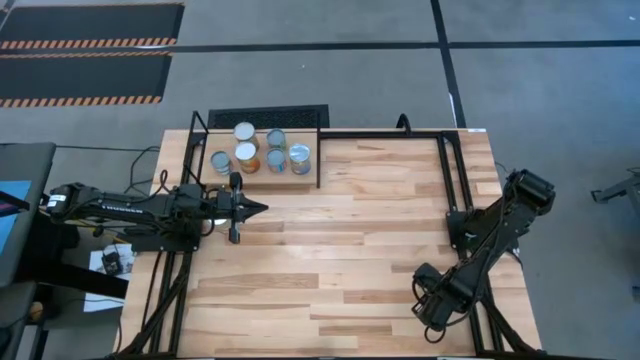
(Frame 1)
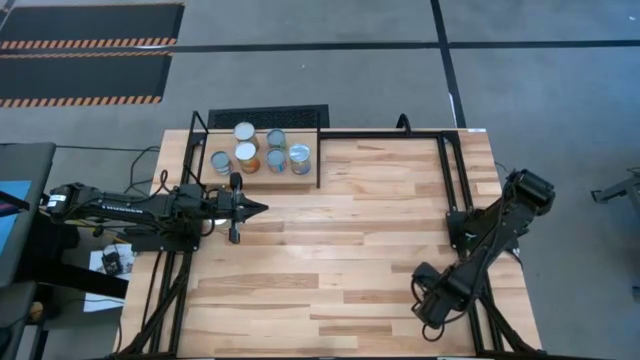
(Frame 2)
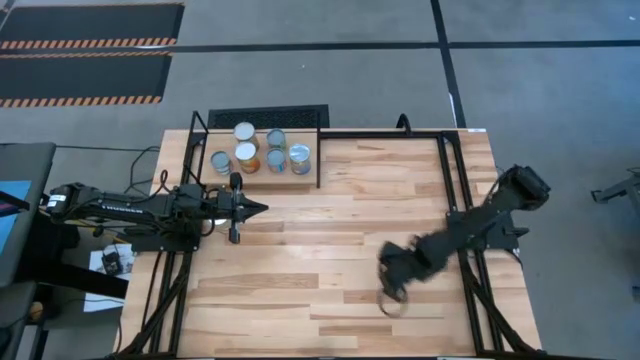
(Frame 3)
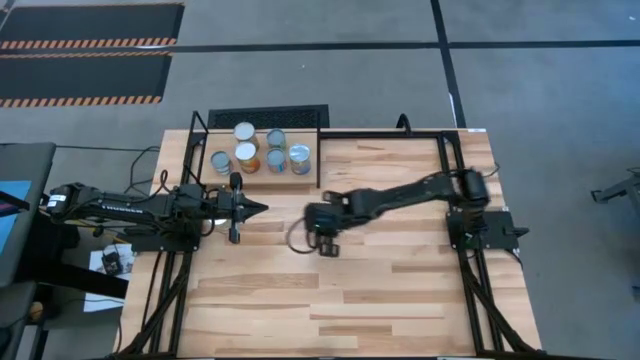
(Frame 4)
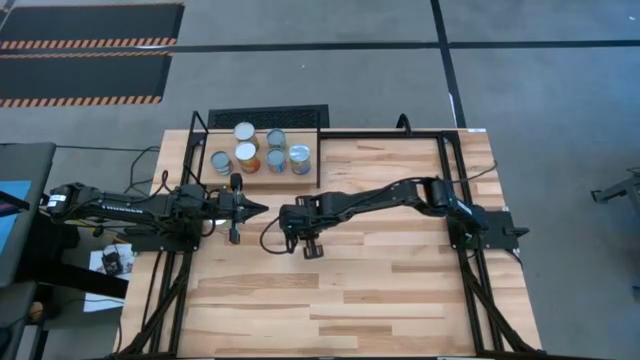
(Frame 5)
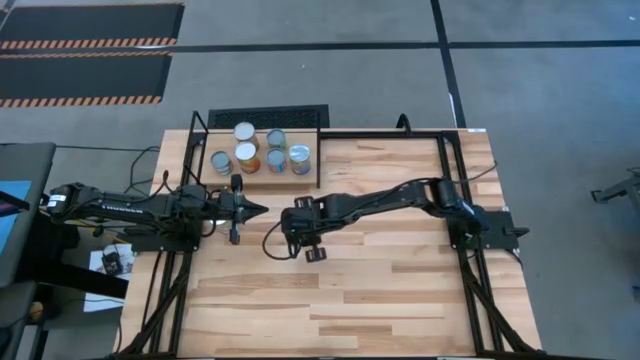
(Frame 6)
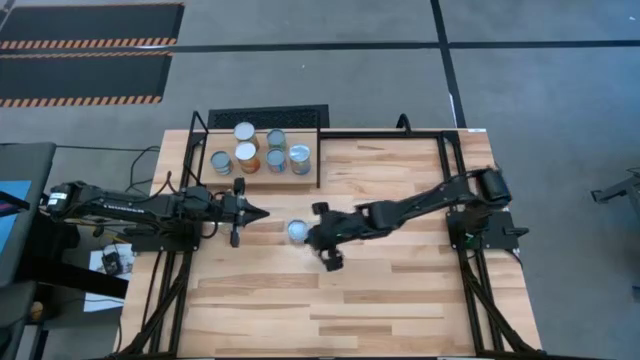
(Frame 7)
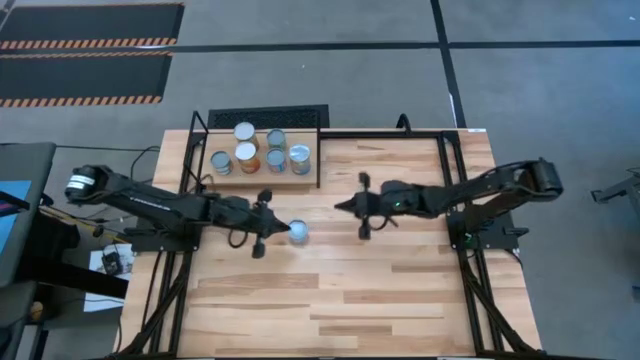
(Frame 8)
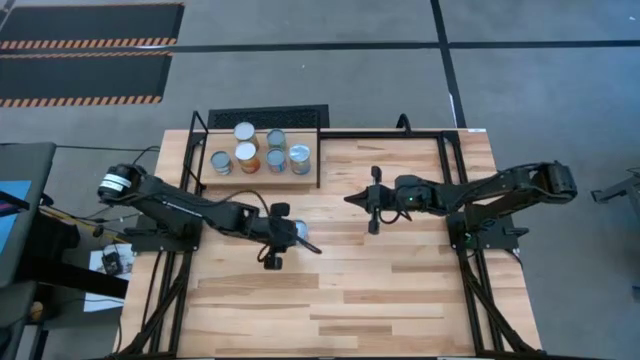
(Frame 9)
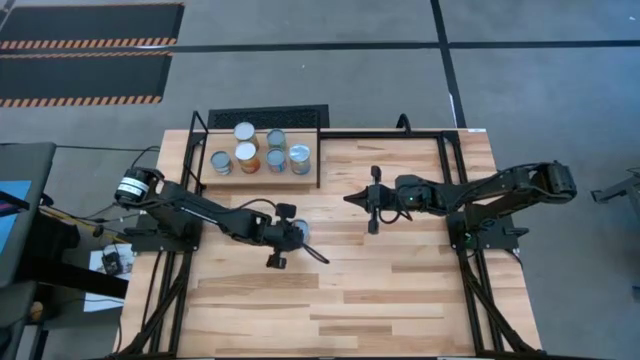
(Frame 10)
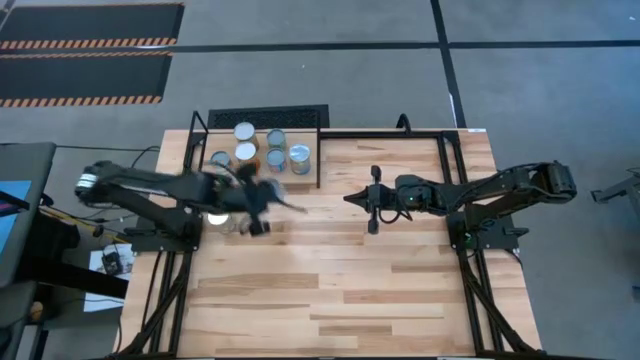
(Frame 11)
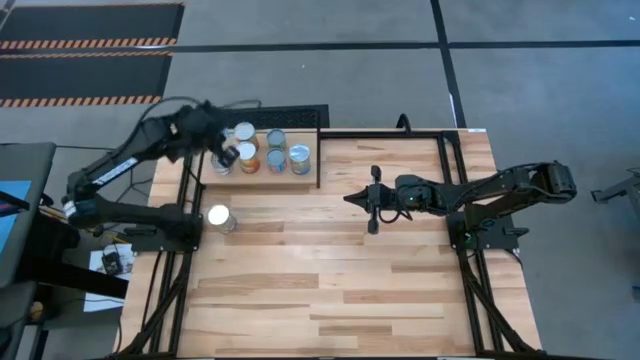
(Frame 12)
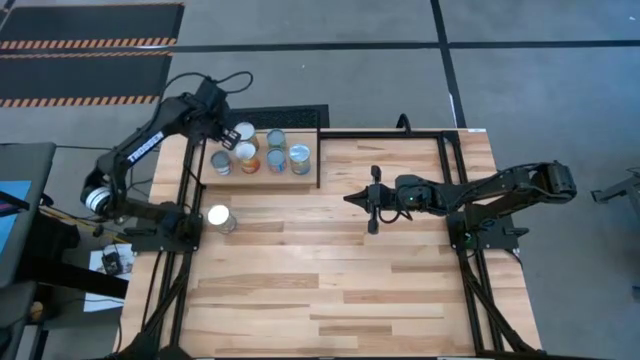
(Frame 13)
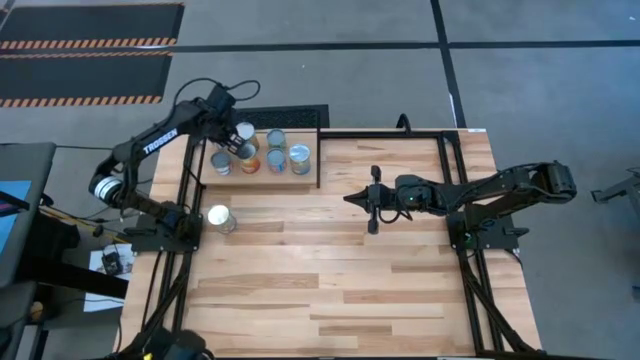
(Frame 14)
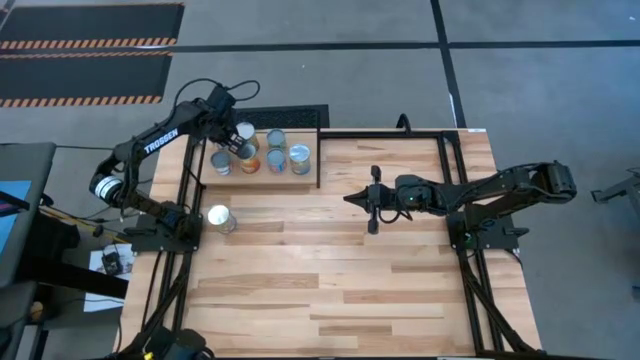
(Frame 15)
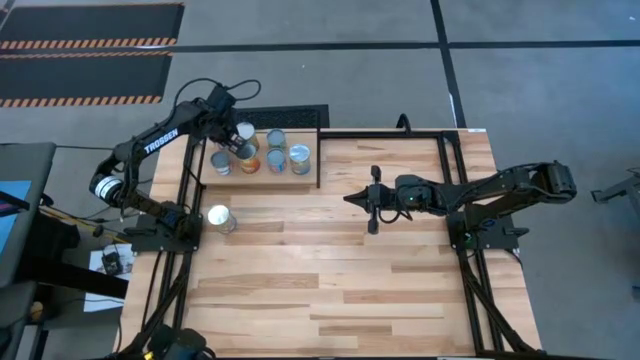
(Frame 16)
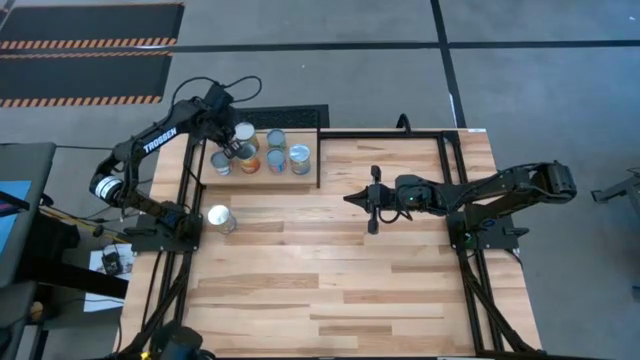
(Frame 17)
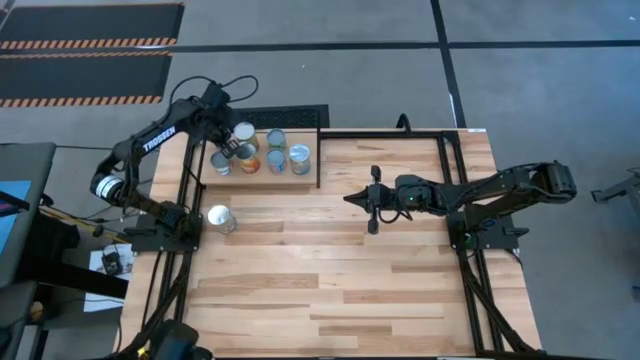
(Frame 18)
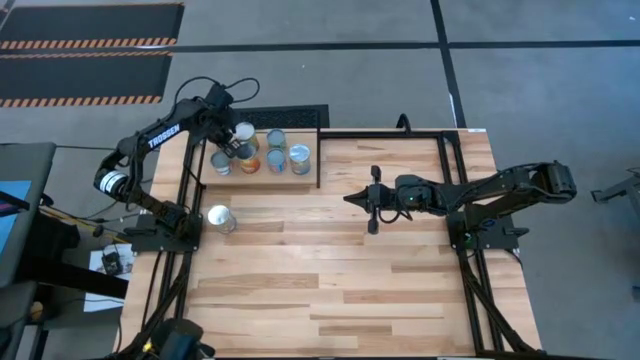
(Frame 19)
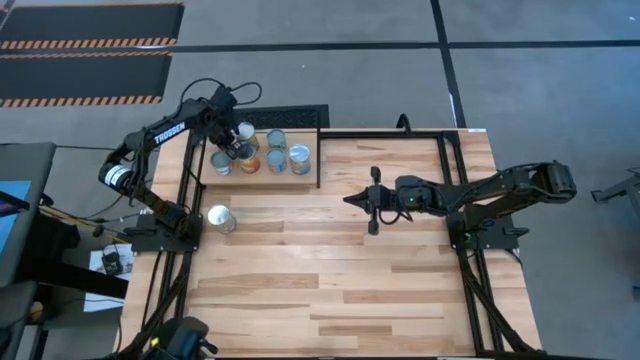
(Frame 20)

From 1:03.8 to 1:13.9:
Task: Pick and place cans onto a shelf
Put the canned carrots on the shelf

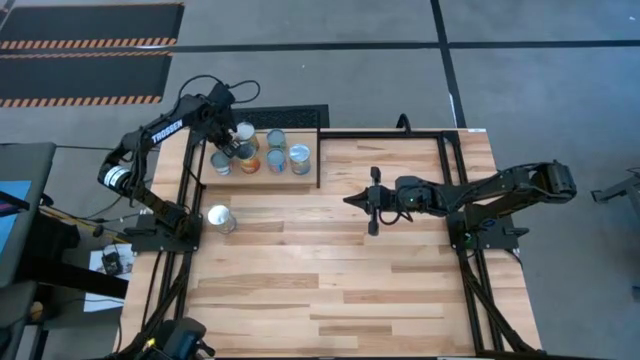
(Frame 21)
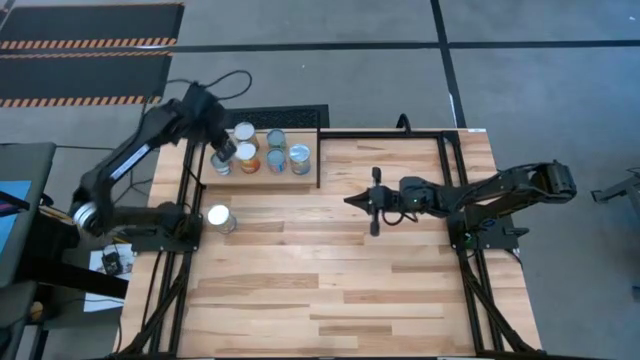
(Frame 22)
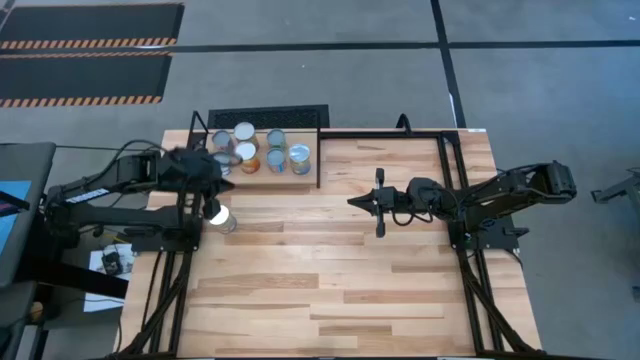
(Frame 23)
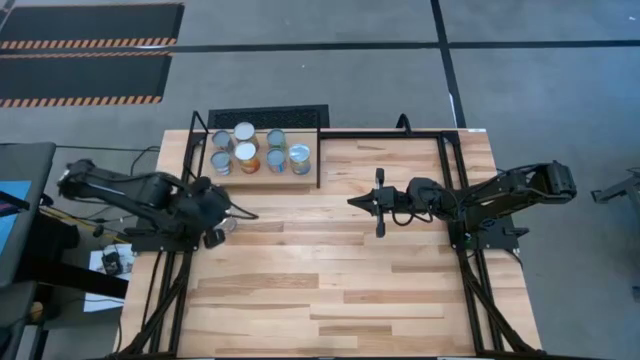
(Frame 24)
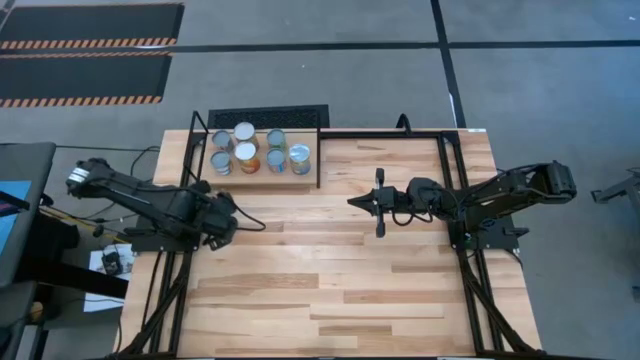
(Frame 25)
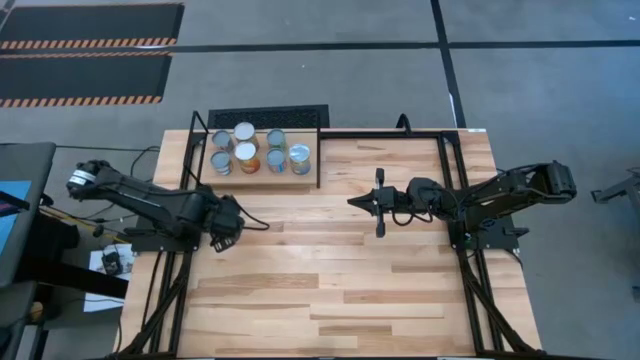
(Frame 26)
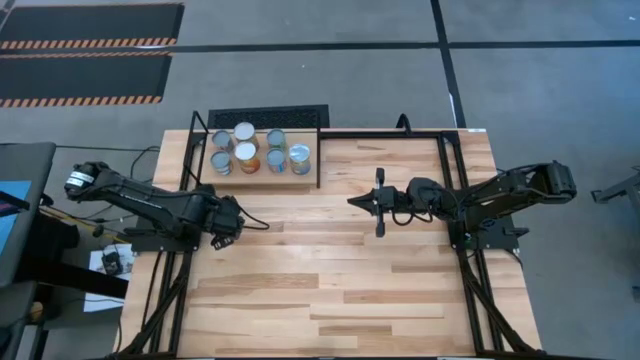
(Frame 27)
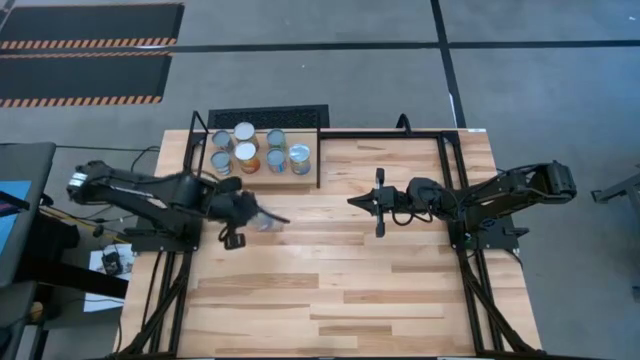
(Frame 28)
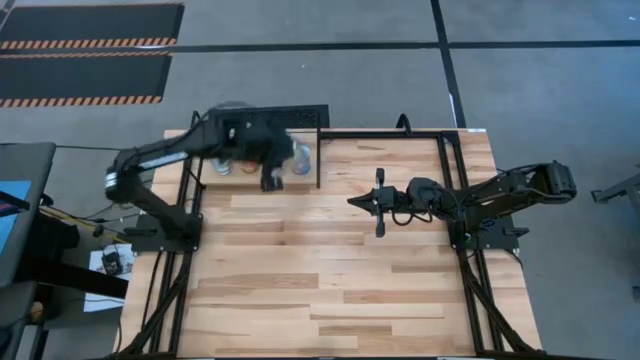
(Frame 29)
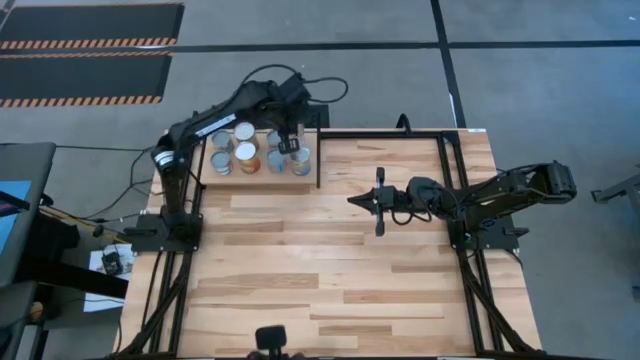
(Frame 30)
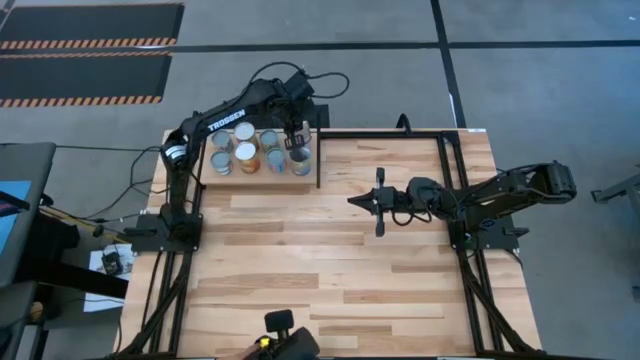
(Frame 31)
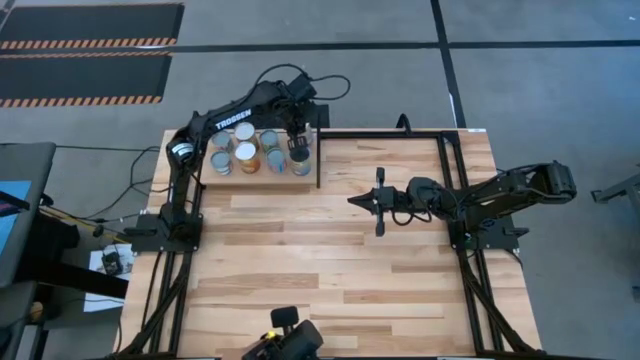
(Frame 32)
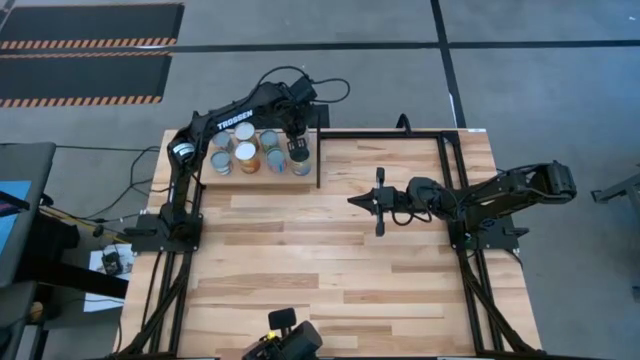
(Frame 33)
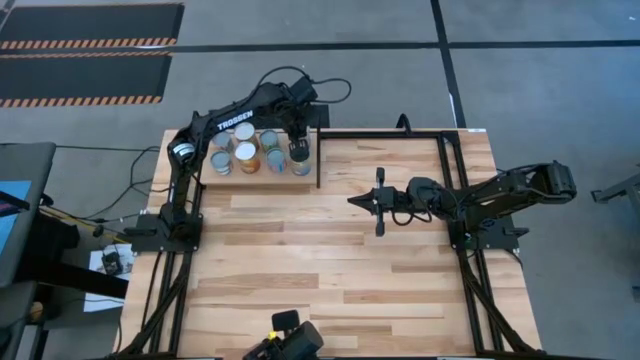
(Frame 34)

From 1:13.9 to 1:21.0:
Put the peaches on the shelf

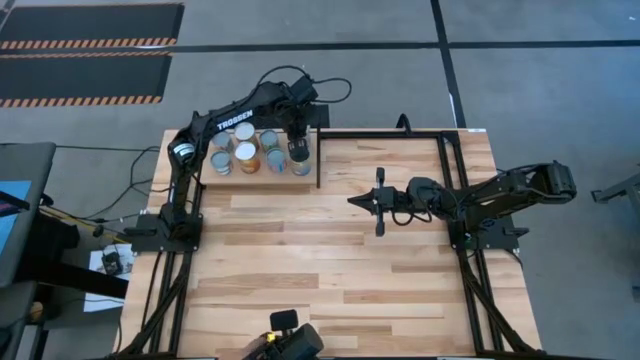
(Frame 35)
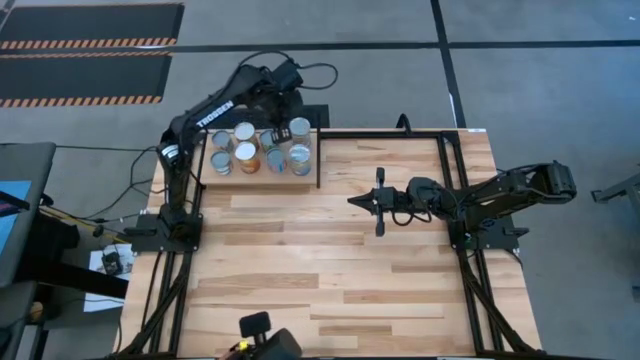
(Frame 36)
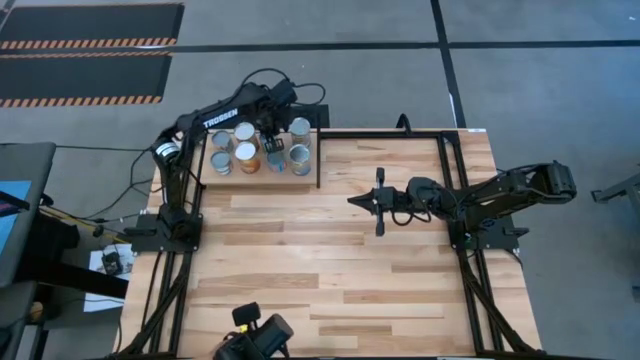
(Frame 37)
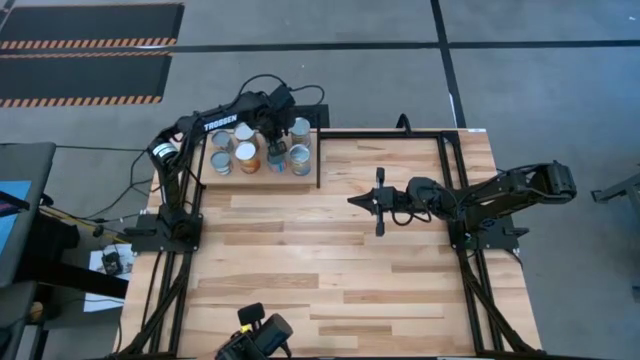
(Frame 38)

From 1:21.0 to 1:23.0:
Adjust the canned corn on the shelf

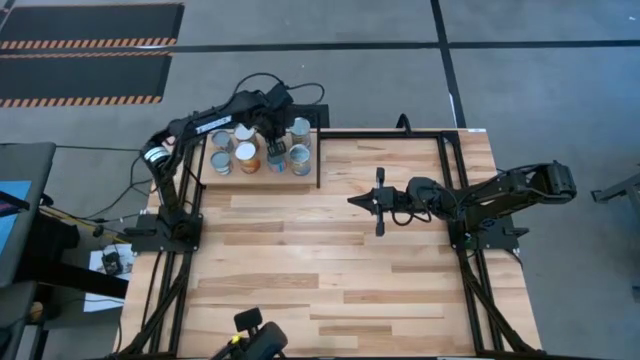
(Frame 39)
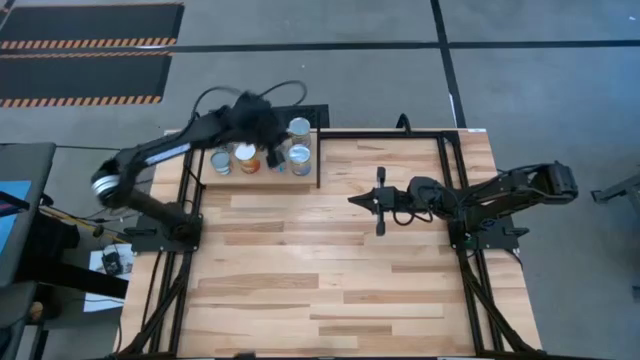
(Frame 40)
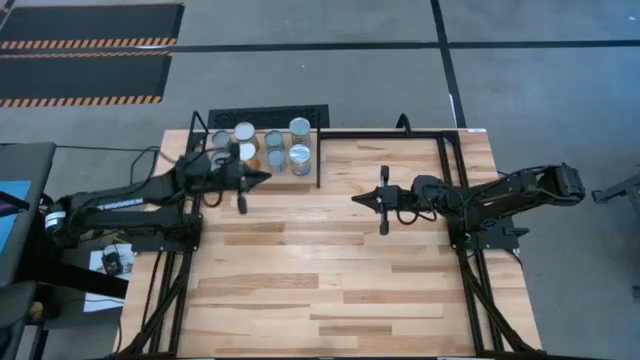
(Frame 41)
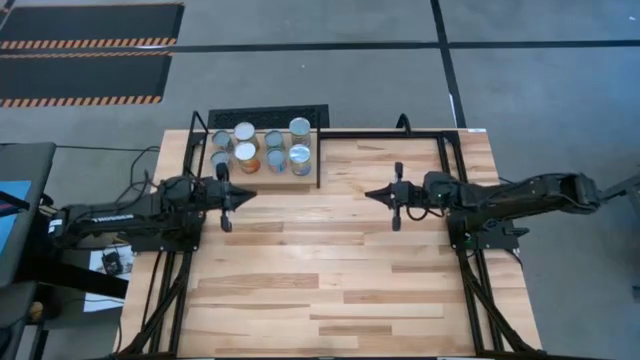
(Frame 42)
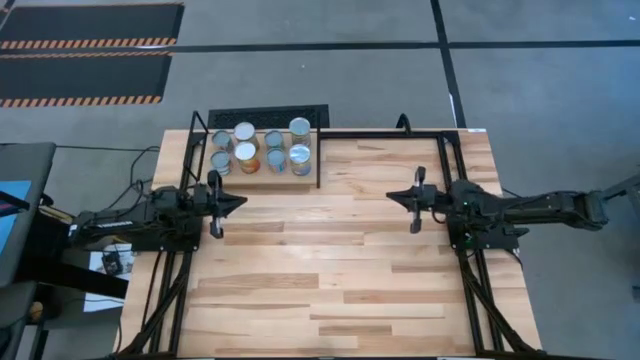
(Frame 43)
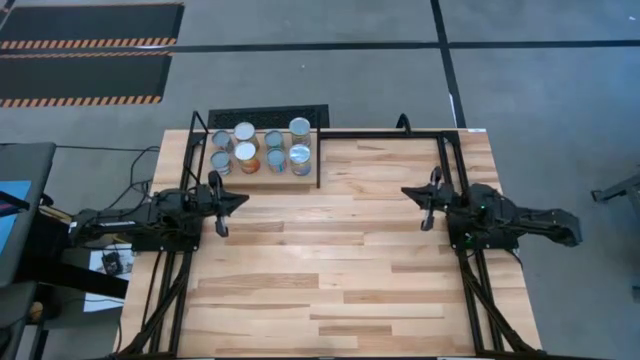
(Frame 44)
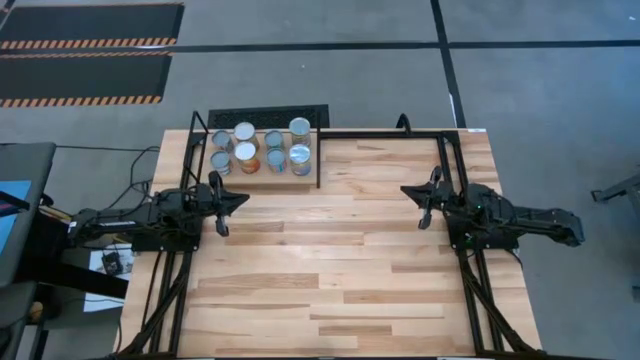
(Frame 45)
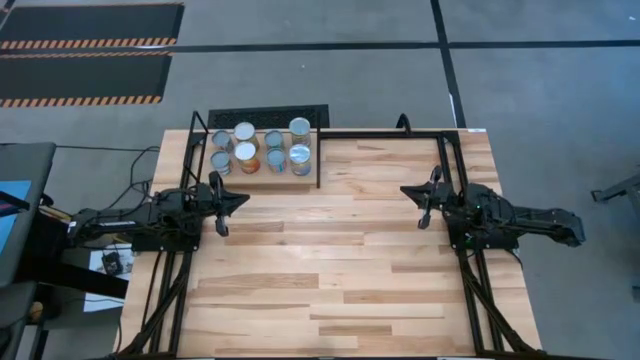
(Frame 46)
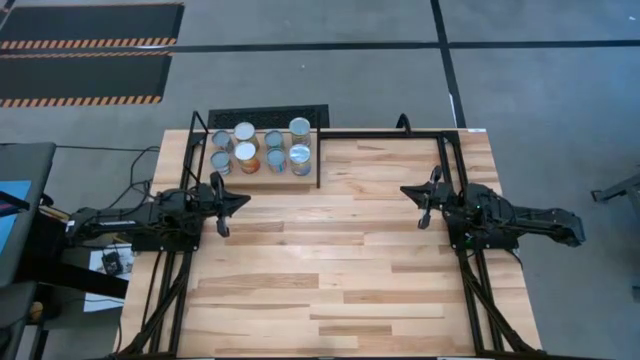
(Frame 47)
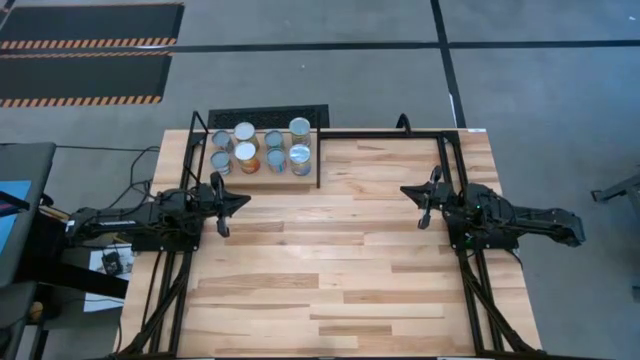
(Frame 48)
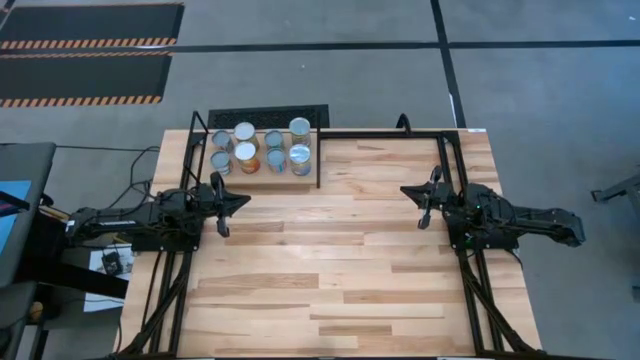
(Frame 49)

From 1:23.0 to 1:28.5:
Return to Home Position
